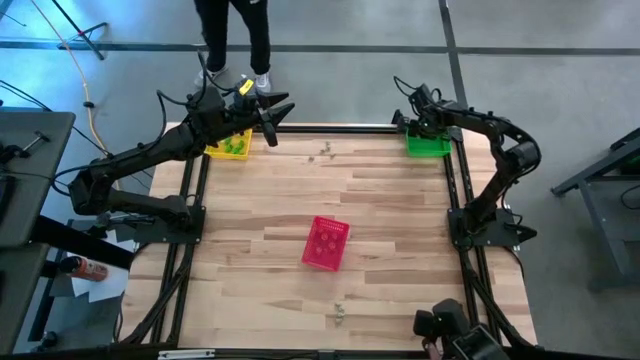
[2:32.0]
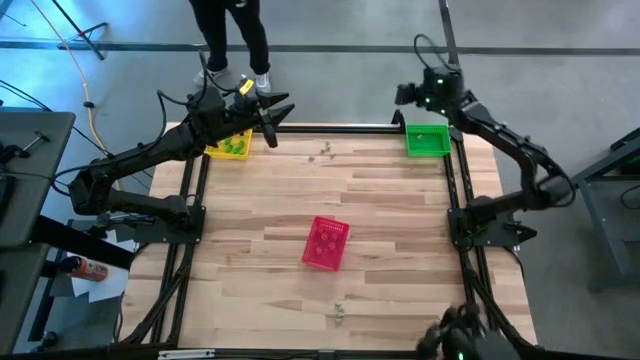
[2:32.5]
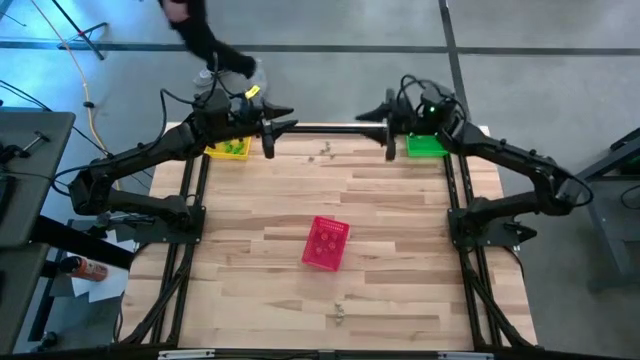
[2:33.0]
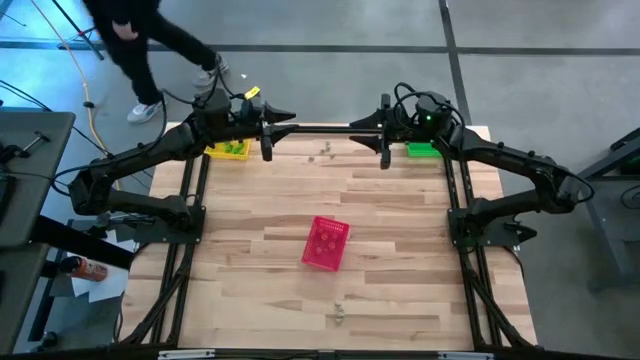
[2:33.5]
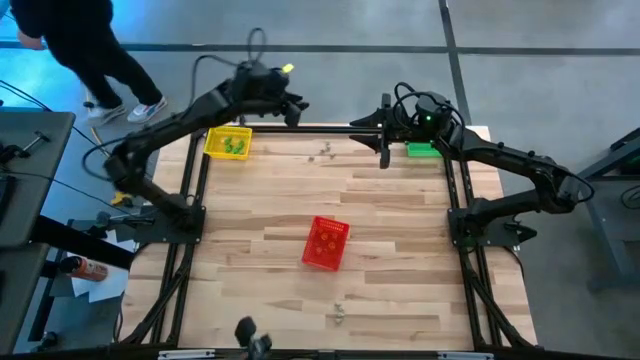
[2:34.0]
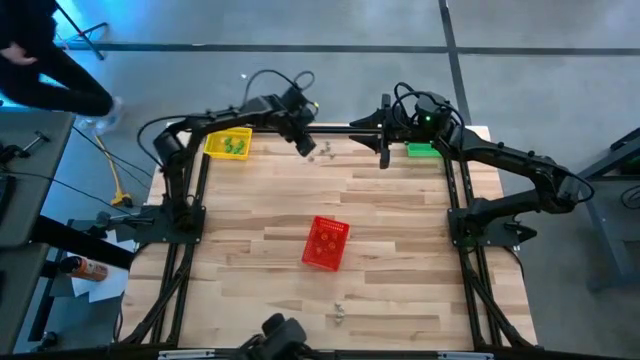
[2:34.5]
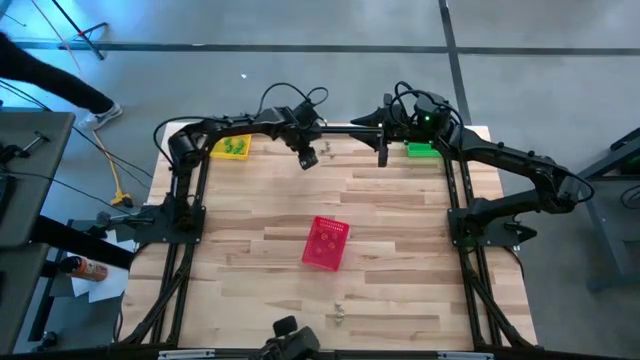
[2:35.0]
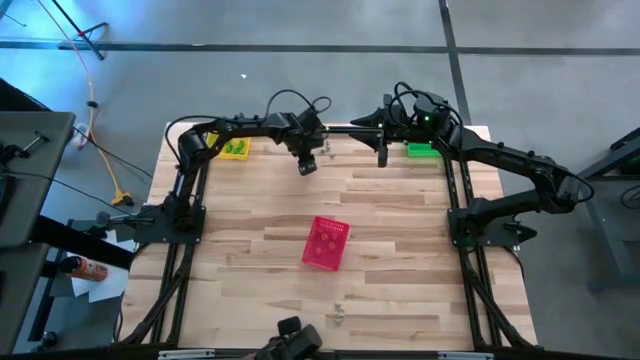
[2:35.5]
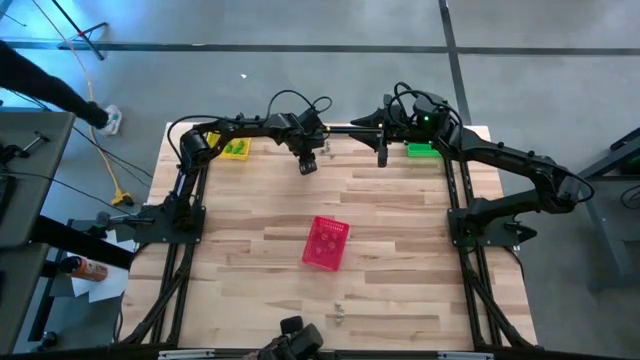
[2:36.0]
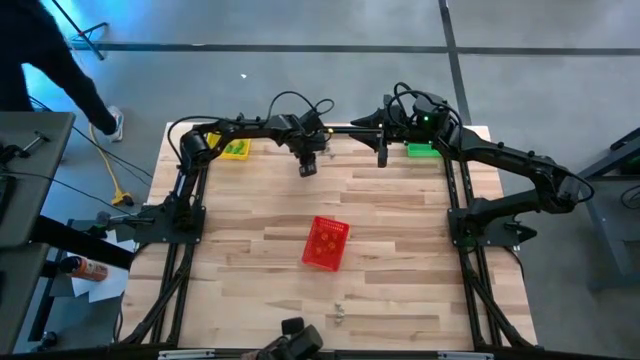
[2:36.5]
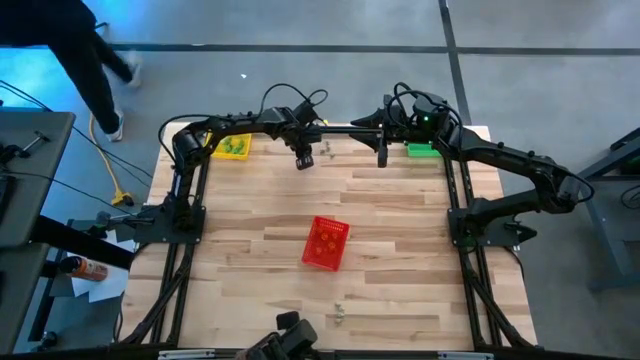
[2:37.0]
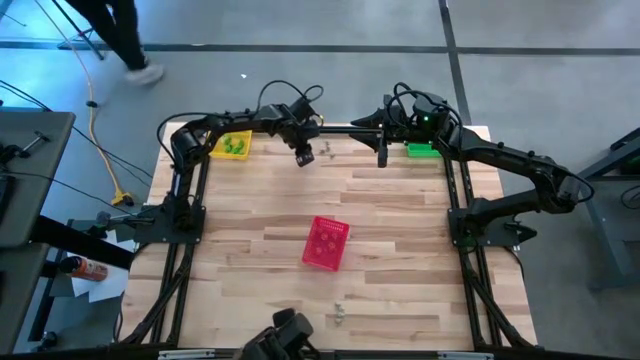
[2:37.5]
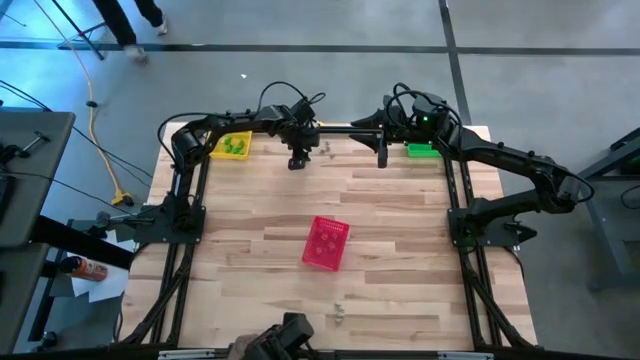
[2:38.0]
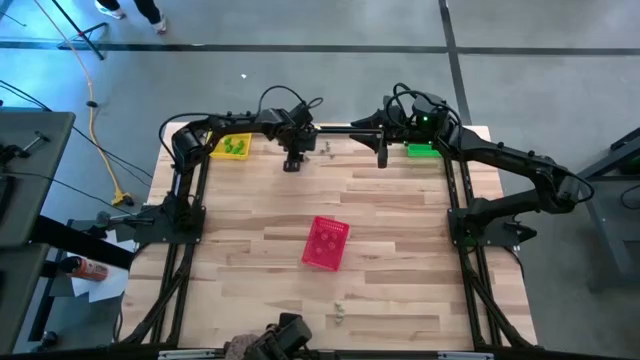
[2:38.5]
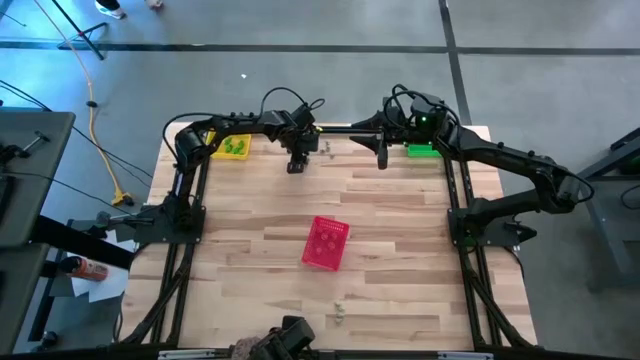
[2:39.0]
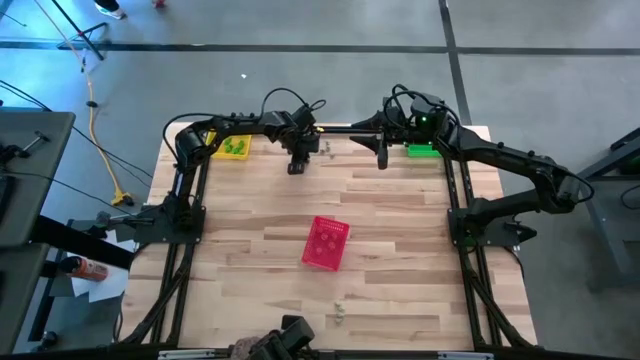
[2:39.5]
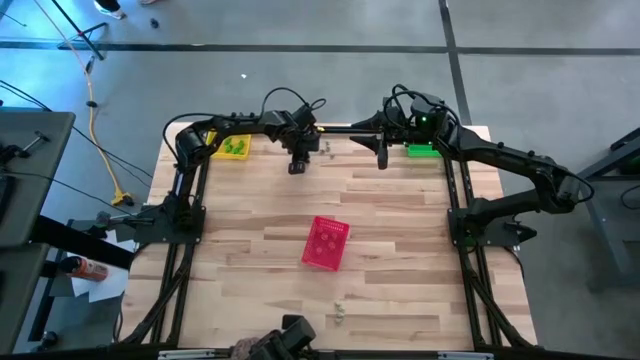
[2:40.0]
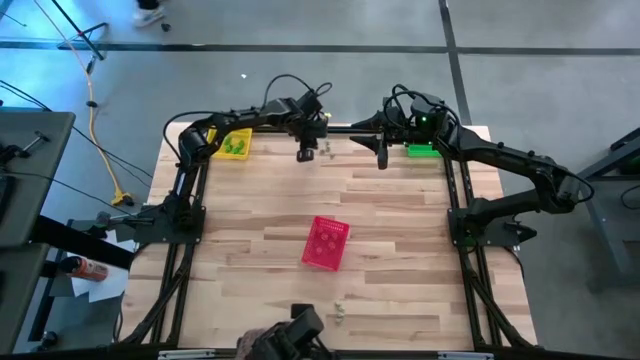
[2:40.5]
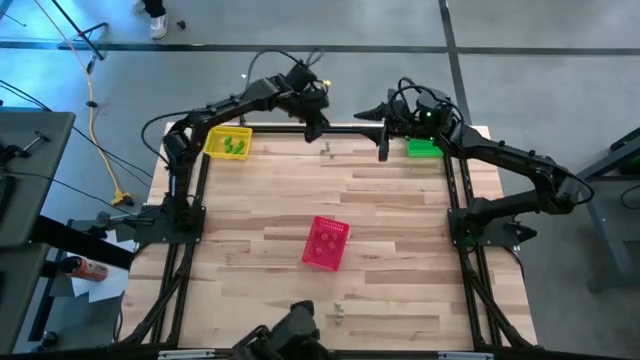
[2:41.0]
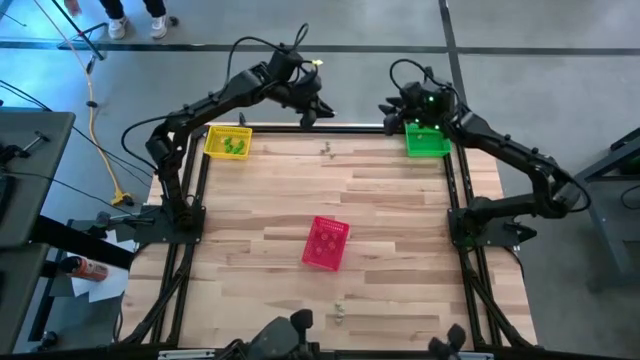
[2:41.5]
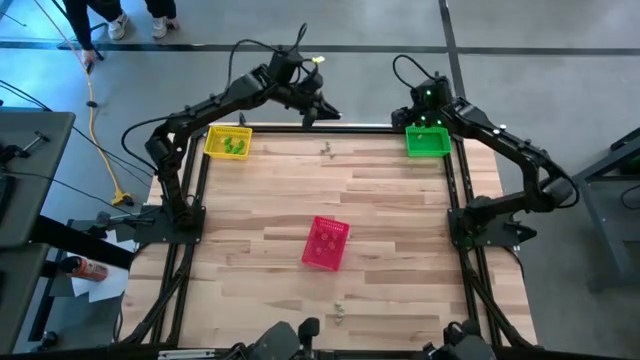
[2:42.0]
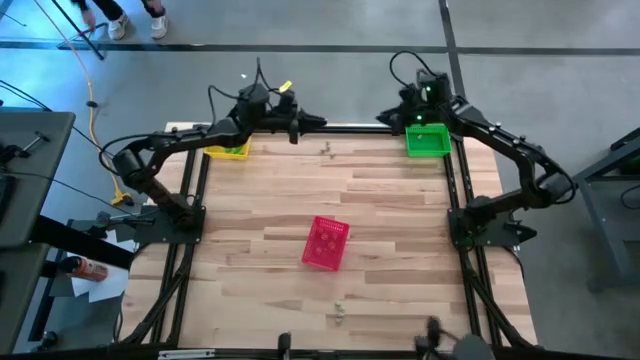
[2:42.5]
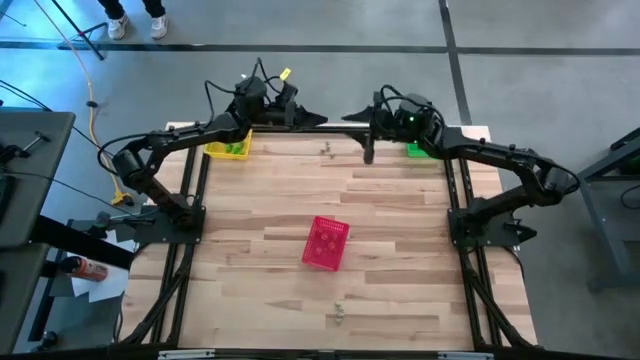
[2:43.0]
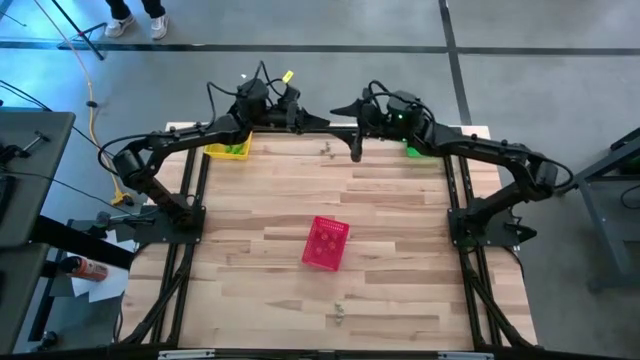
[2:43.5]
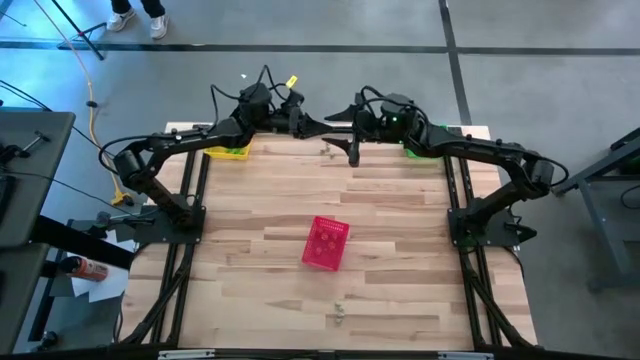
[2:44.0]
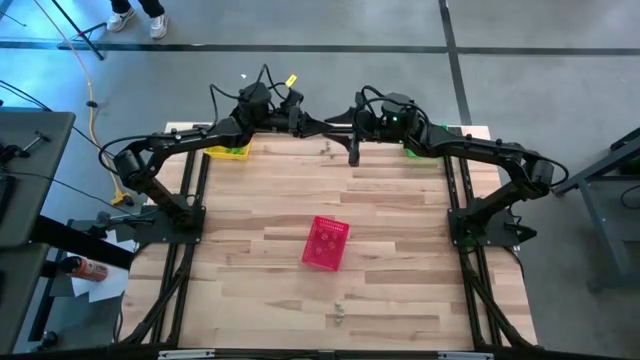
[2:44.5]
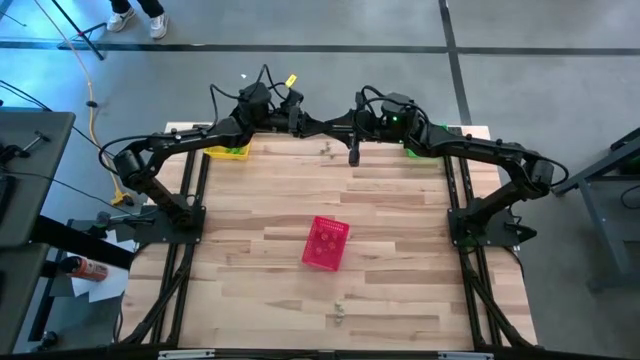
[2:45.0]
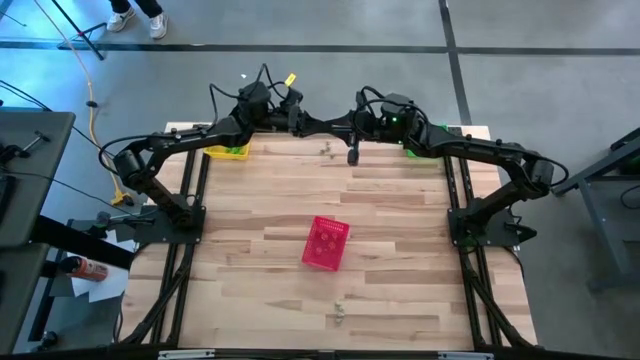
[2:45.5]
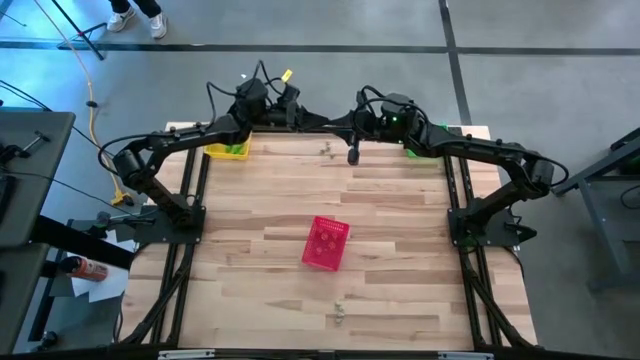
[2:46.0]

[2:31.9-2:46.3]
Task: Sort Halloween decoration
Put the white skull toy into the green bin

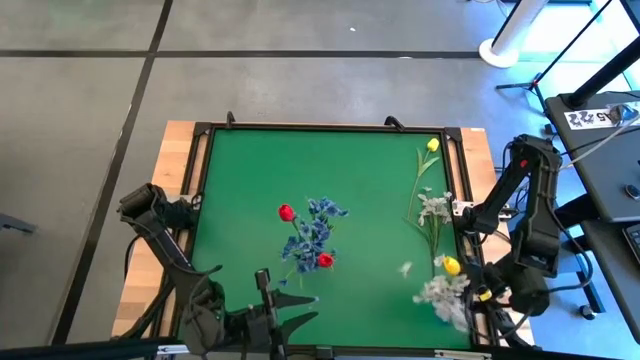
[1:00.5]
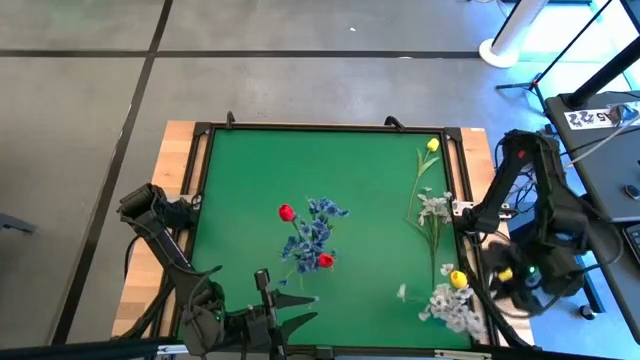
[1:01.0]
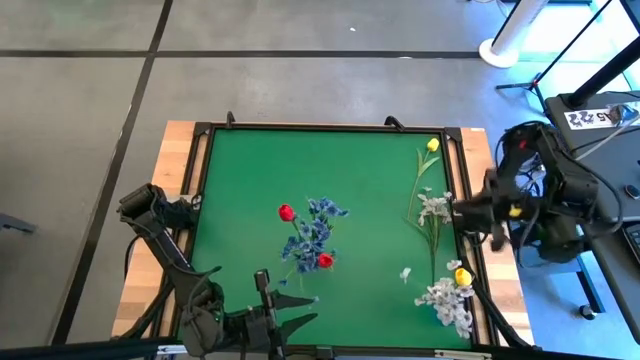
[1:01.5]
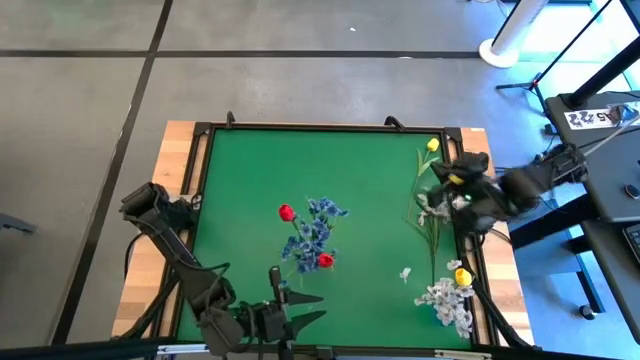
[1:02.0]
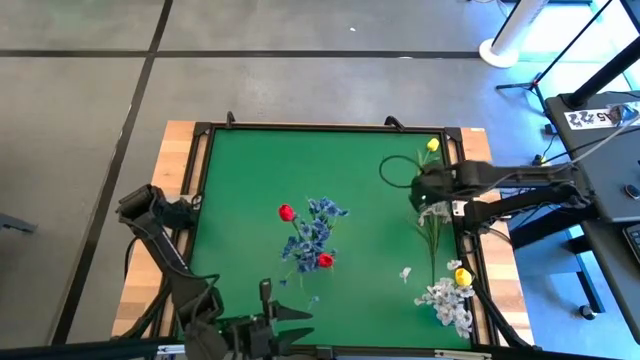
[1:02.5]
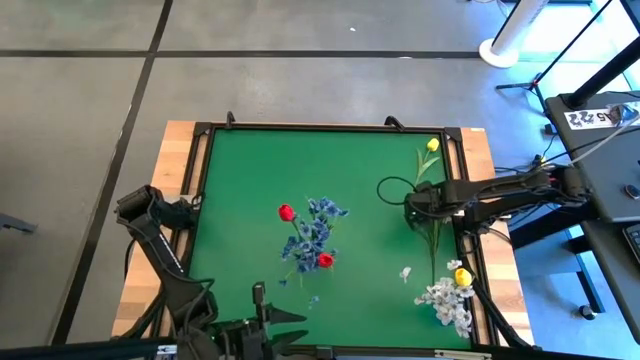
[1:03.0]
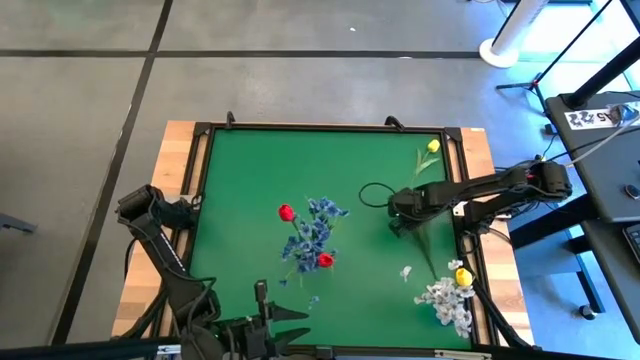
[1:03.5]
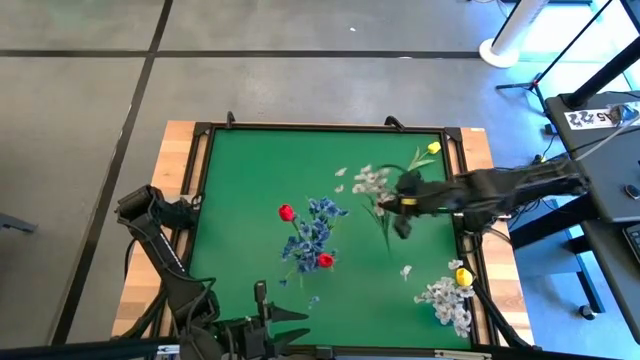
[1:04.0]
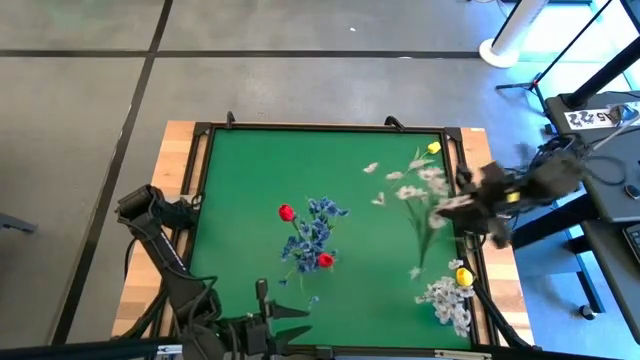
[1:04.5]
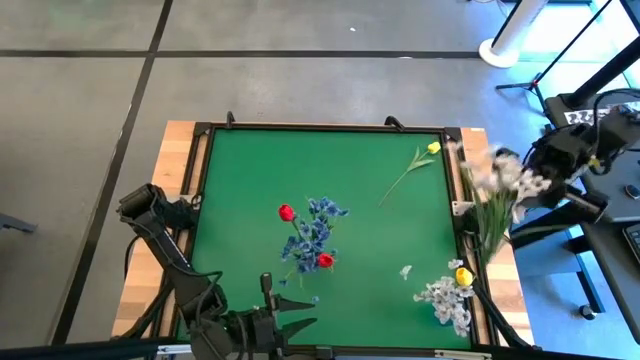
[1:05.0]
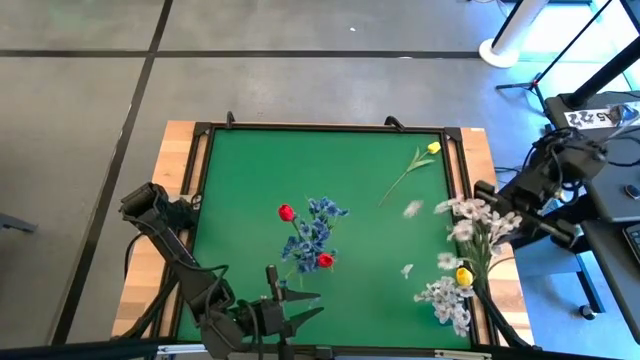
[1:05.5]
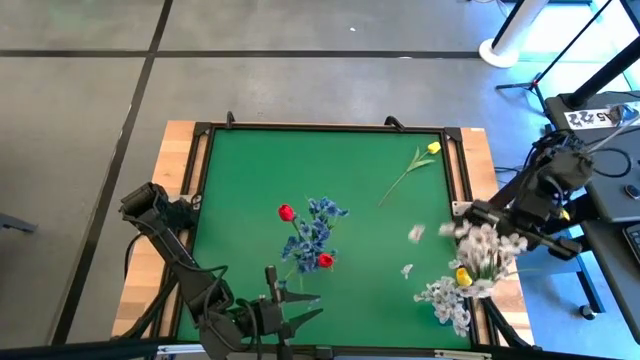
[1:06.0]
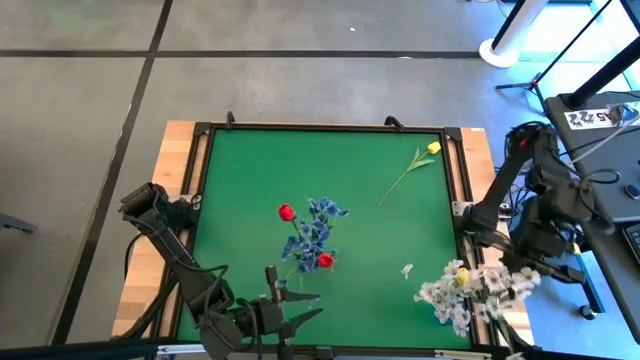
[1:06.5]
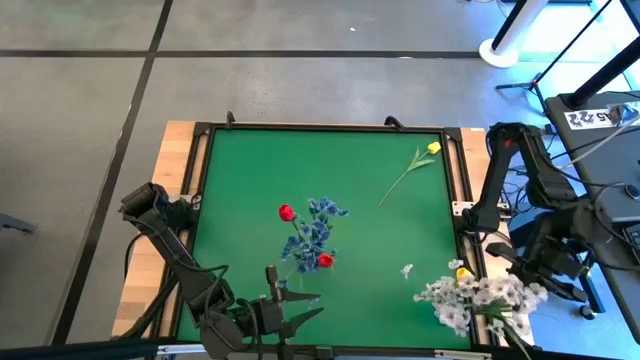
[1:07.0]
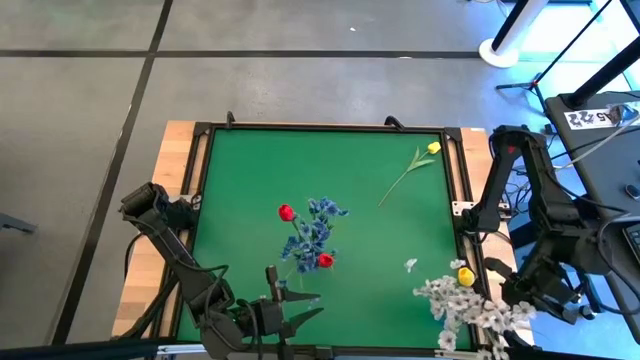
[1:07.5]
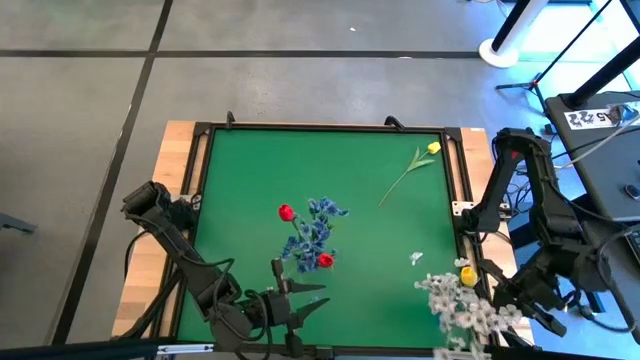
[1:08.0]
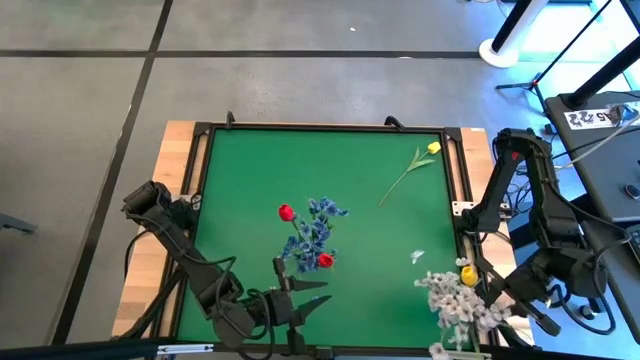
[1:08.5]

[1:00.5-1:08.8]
Task: Sort flowers into vase by color
Put the white flowers into the blue vase
